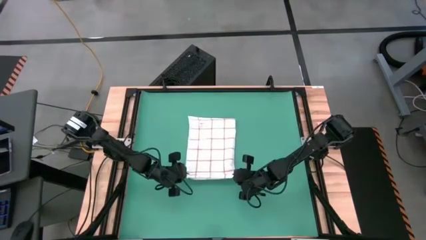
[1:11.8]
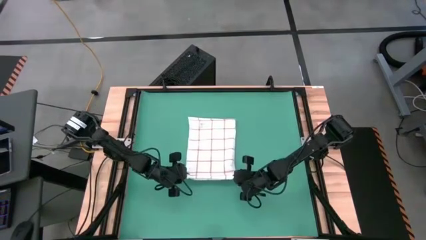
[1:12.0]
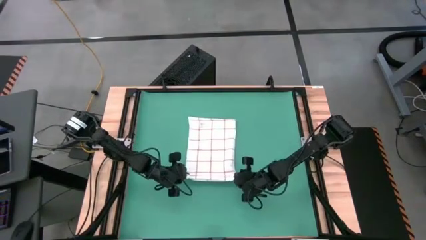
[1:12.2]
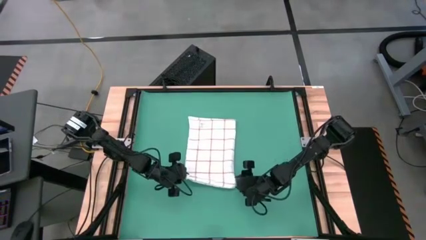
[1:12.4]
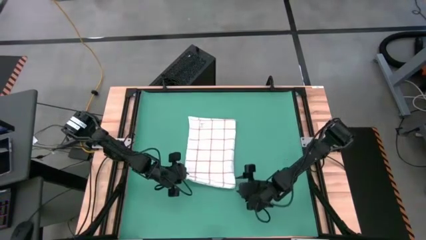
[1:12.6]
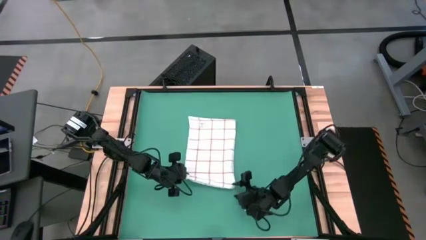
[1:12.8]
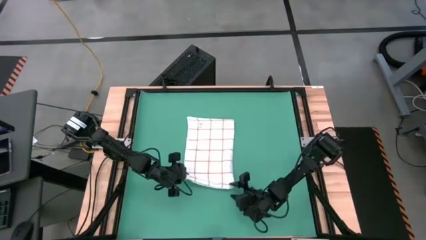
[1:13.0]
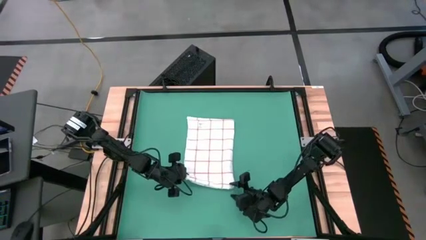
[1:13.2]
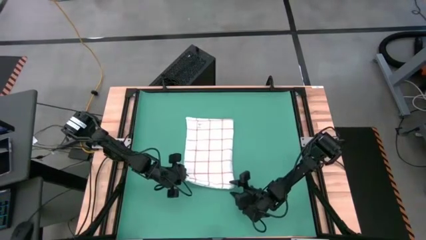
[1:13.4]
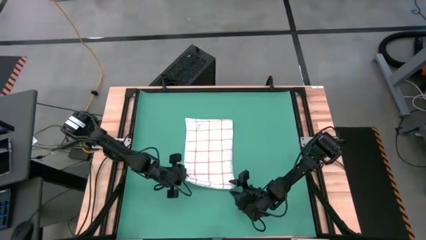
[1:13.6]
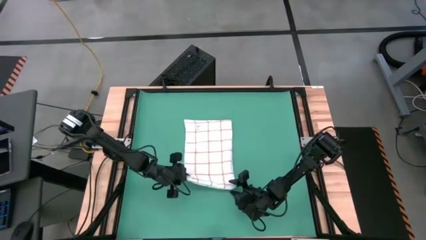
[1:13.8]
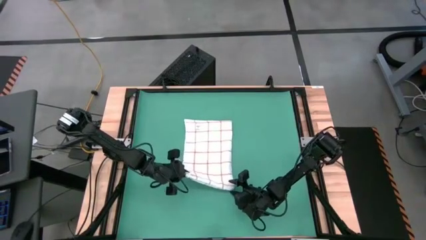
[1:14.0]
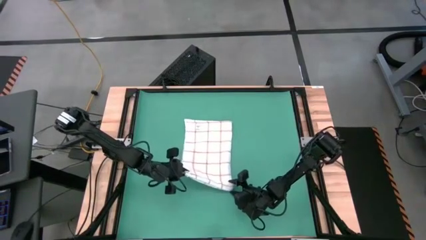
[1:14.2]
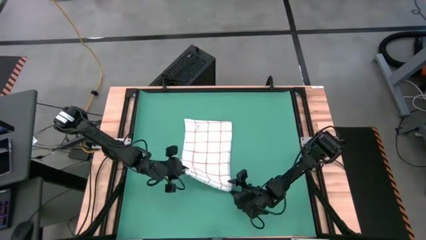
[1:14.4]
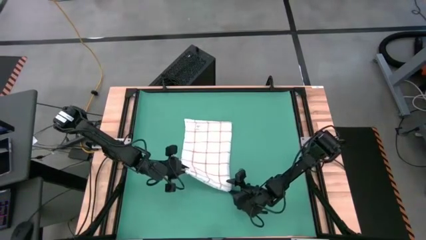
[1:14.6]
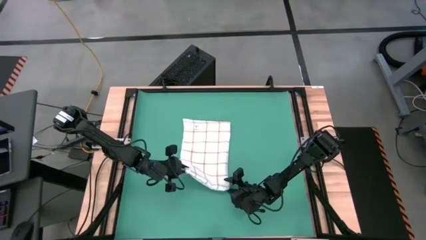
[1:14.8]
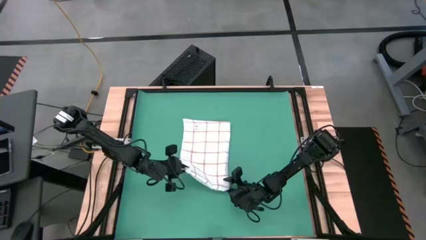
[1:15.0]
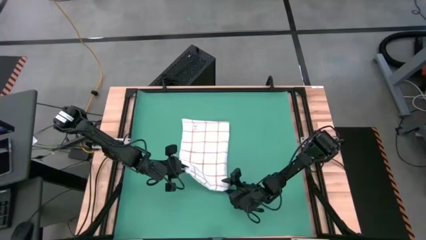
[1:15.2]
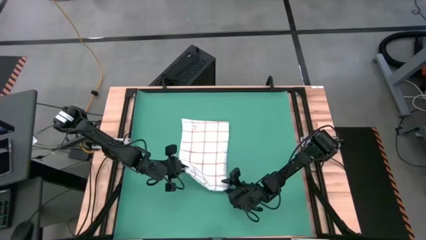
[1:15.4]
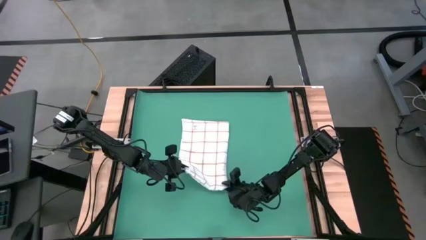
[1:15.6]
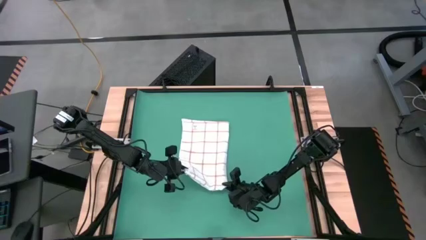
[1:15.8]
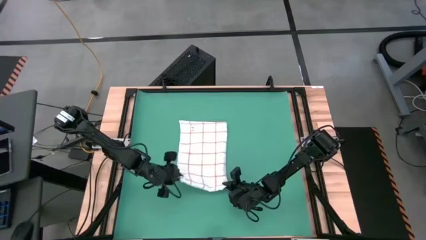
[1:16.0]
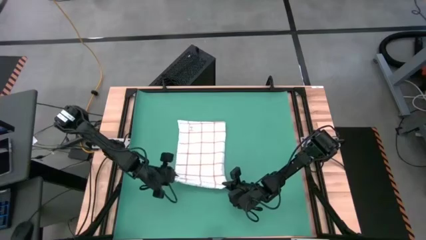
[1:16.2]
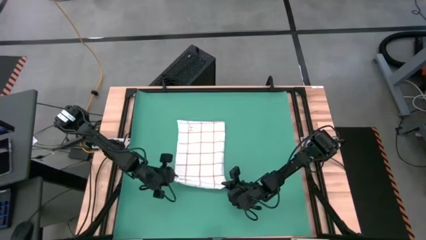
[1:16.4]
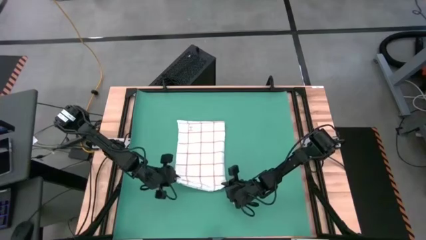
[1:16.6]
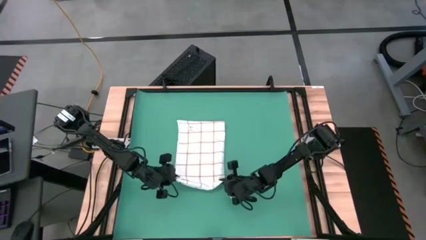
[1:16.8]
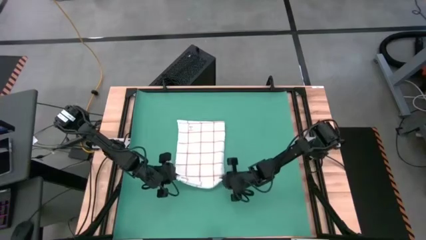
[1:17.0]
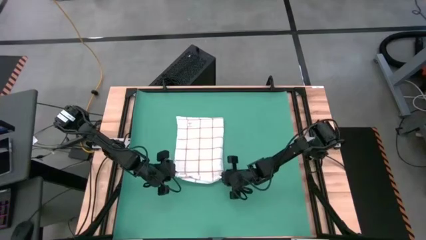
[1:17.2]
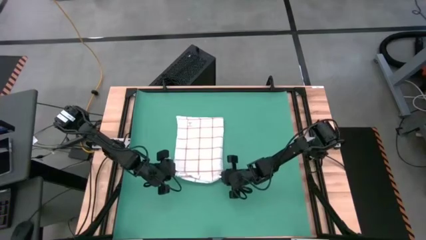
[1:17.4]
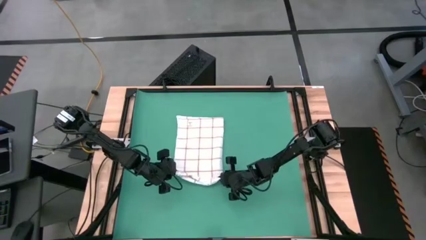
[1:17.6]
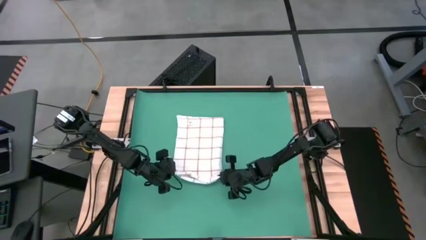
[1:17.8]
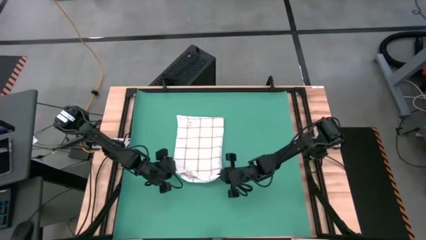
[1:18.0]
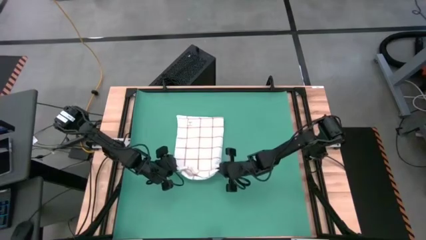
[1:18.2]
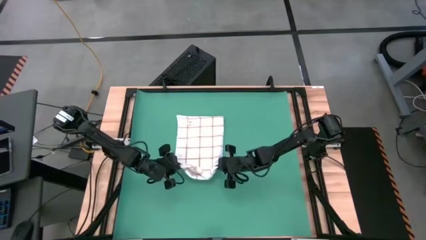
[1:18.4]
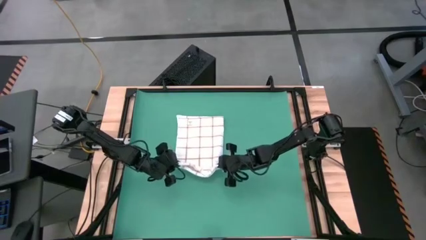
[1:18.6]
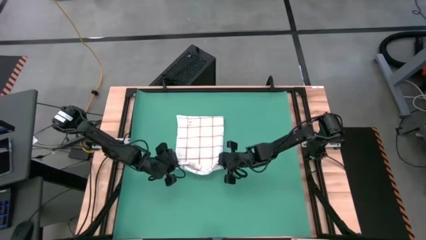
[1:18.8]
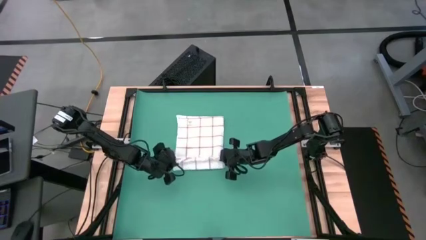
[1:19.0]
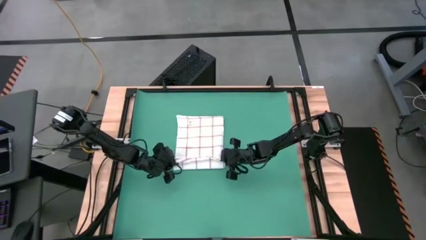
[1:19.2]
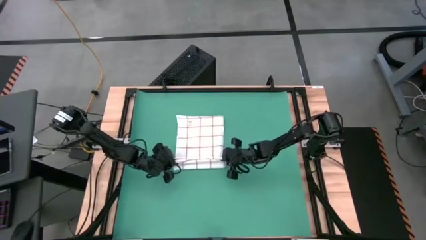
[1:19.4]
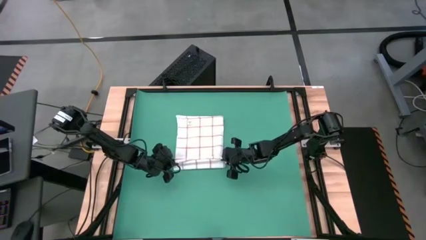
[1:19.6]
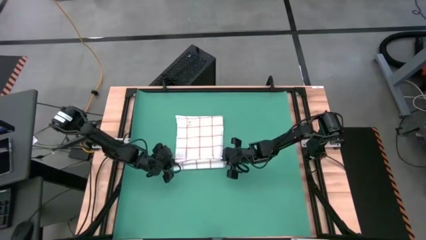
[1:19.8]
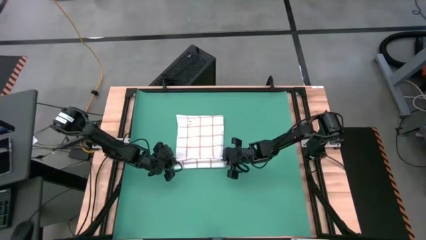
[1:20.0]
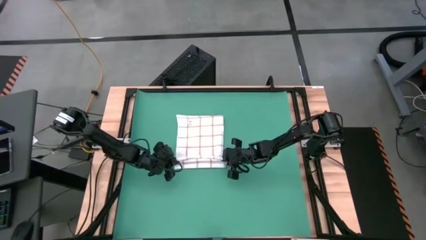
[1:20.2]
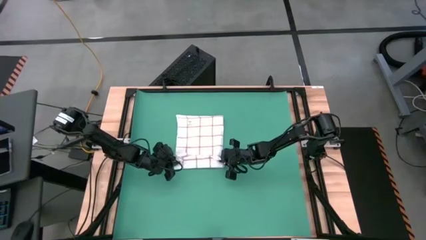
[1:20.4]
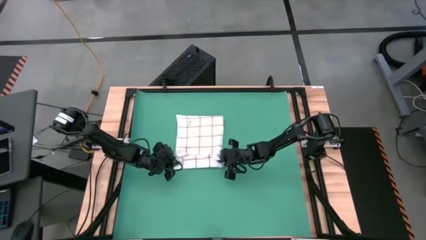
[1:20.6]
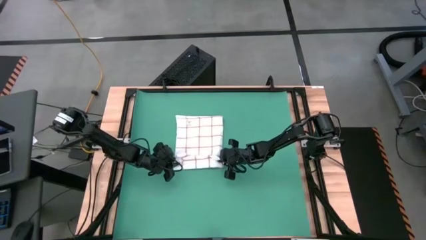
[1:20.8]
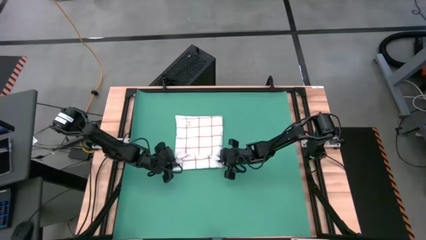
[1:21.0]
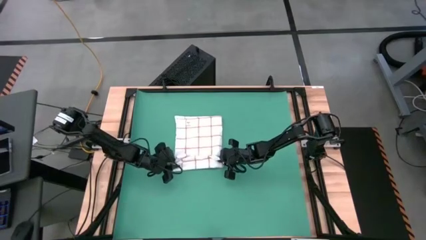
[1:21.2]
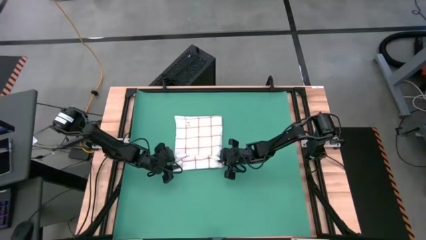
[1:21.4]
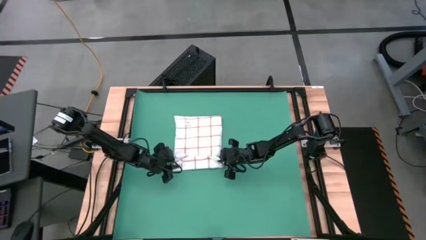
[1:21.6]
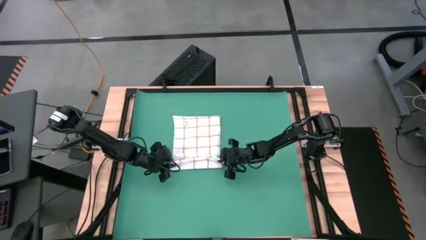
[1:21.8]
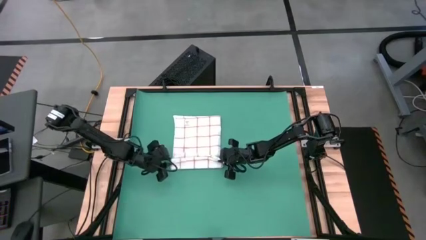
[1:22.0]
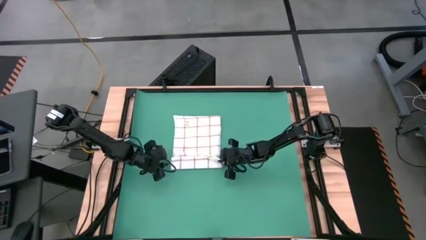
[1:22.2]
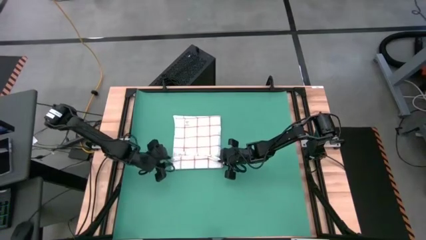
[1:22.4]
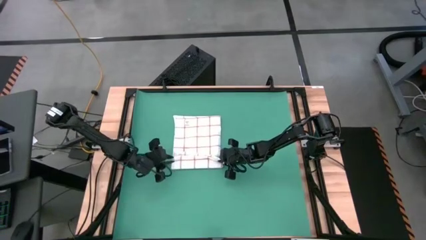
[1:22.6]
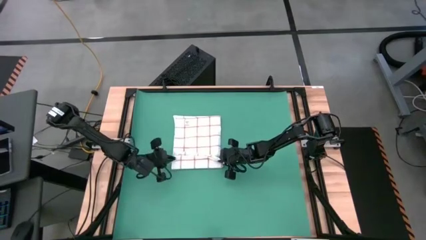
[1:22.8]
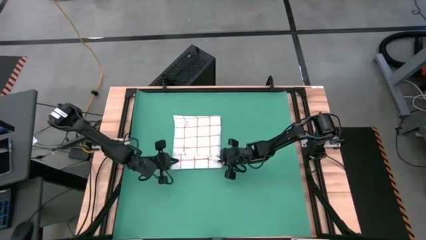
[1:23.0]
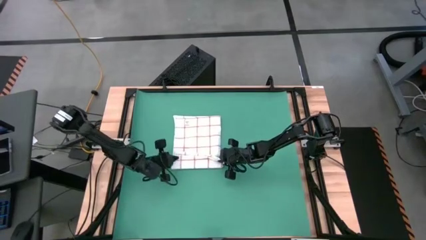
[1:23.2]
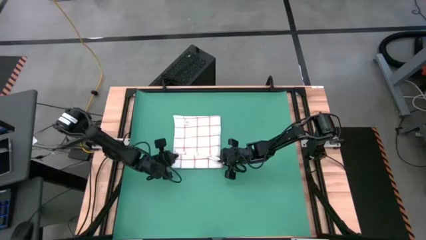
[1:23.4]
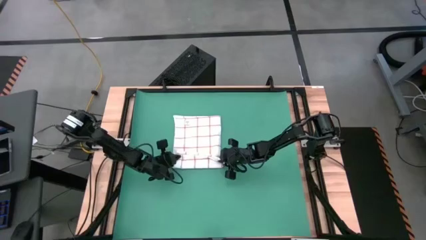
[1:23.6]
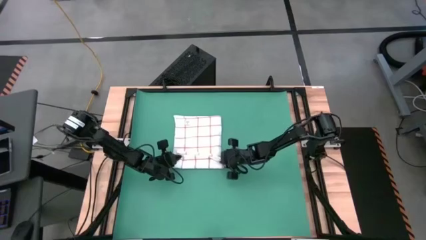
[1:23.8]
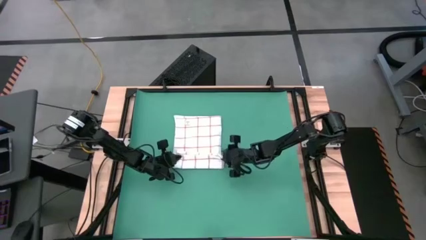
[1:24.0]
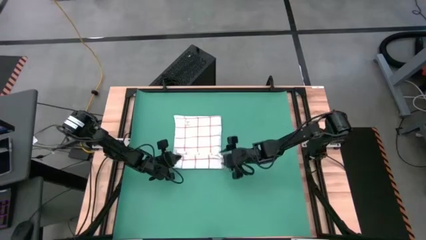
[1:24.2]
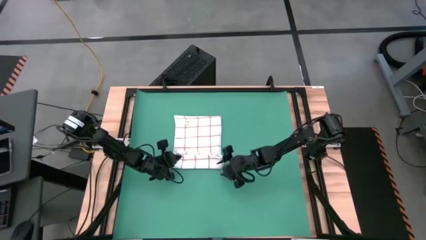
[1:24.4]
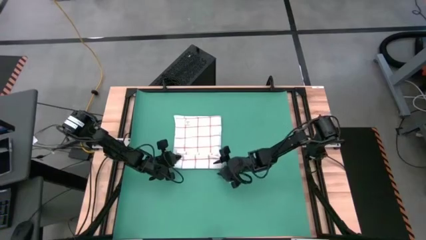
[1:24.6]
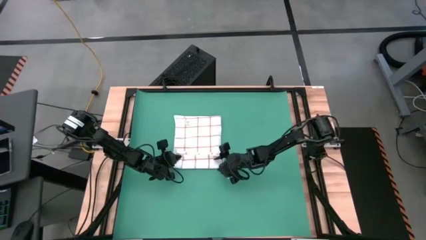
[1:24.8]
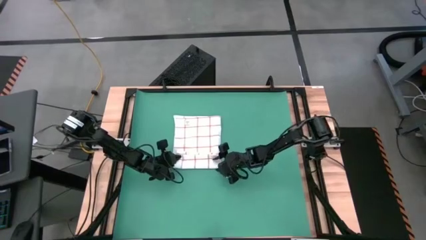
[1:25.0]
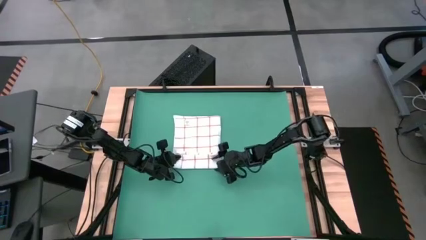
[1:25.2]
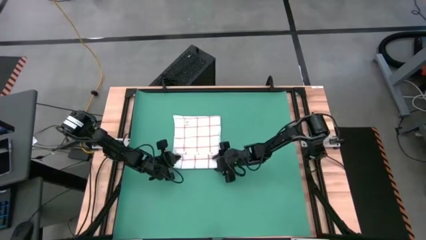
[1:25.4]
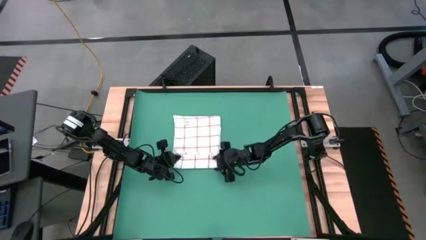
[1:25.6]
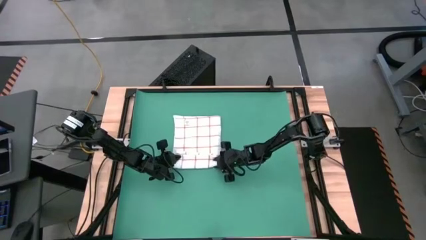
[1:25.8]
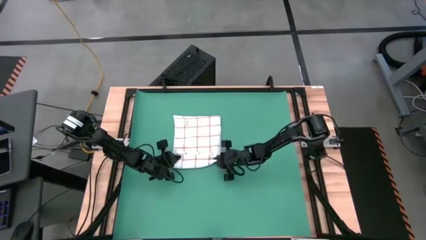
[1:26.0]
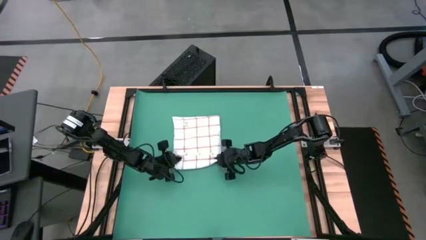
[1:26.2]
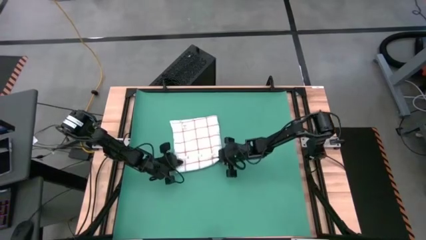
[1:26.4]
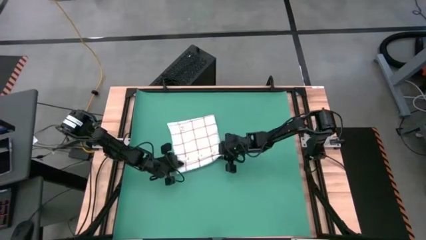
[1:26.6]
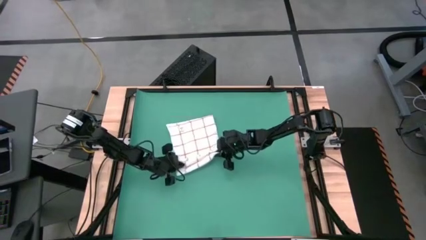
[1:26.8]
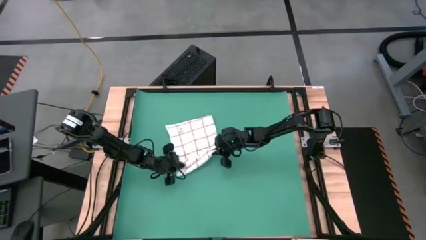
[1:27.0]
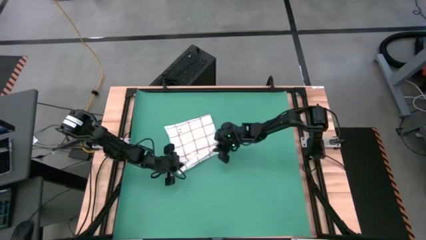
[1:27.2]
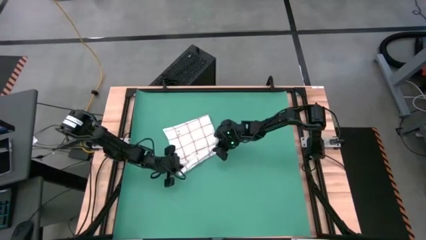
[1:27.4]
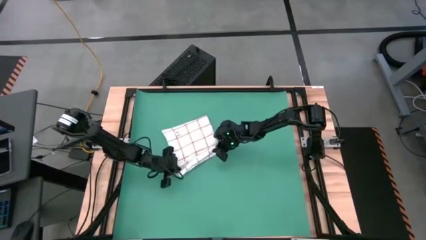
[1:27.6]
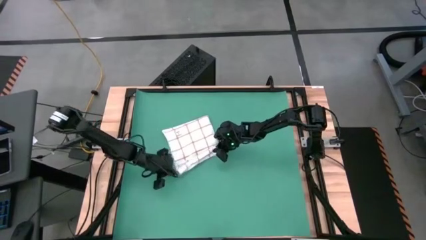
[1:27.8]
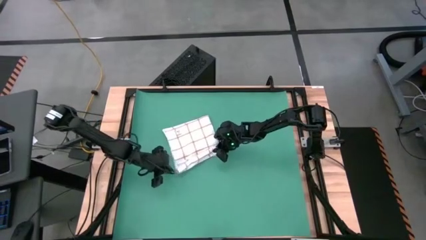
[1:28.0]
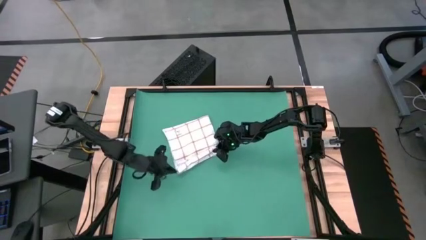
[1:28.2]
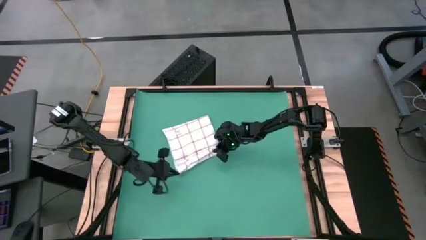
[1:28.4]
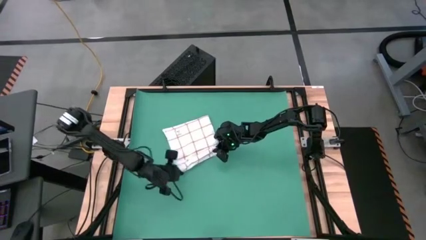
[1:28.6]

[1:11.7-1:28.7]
Task: Roll towel
Roll the white towel
